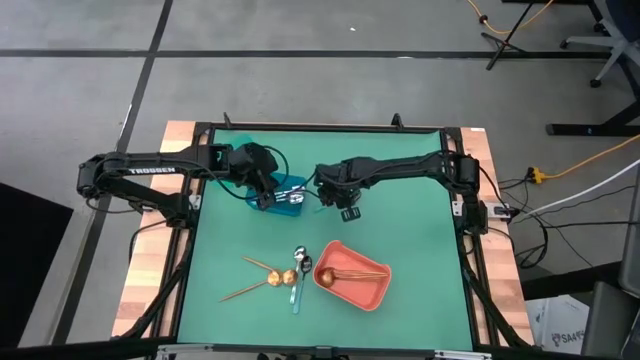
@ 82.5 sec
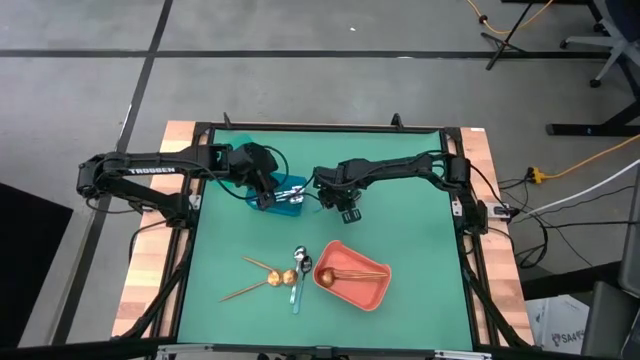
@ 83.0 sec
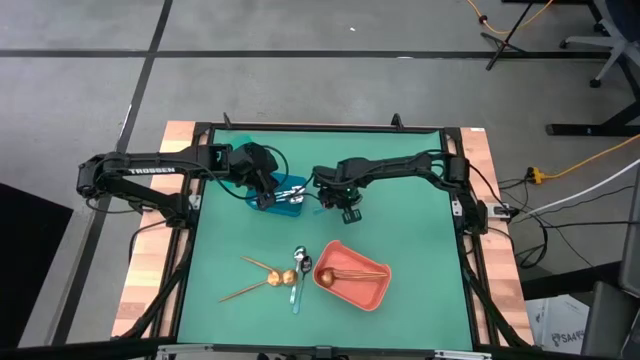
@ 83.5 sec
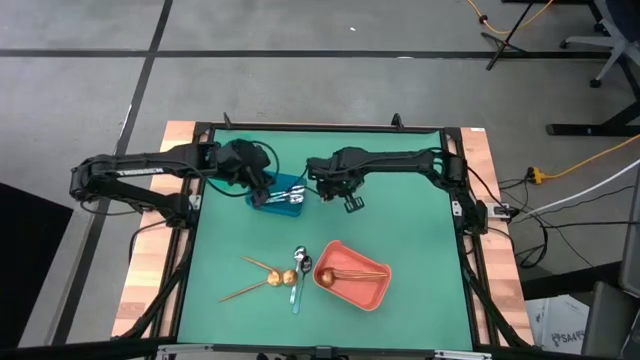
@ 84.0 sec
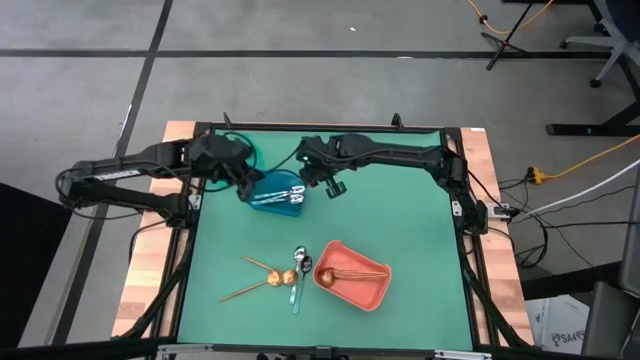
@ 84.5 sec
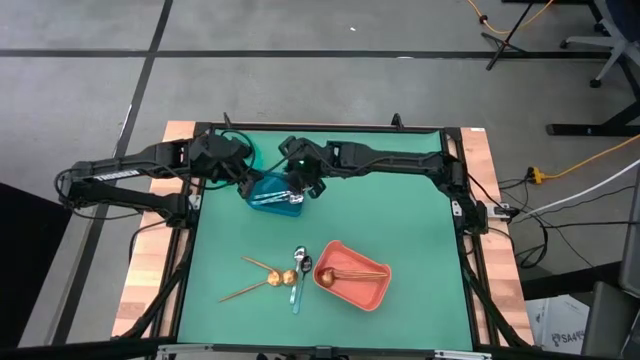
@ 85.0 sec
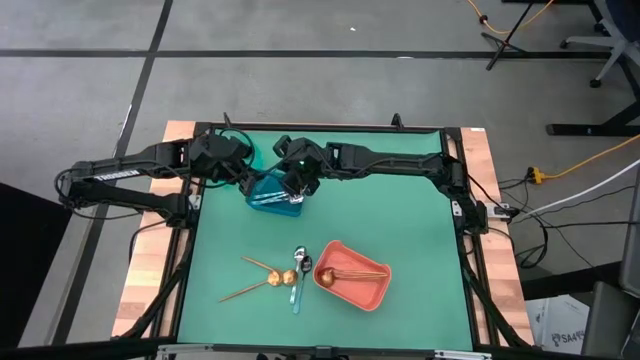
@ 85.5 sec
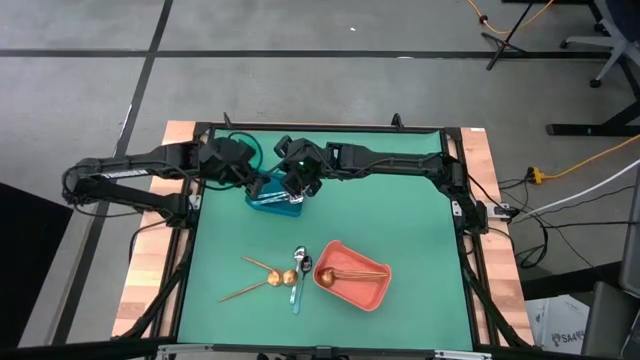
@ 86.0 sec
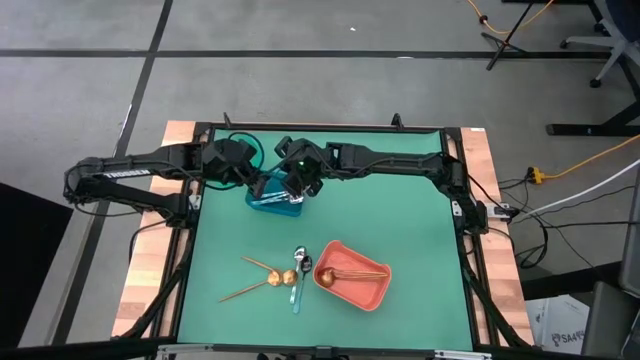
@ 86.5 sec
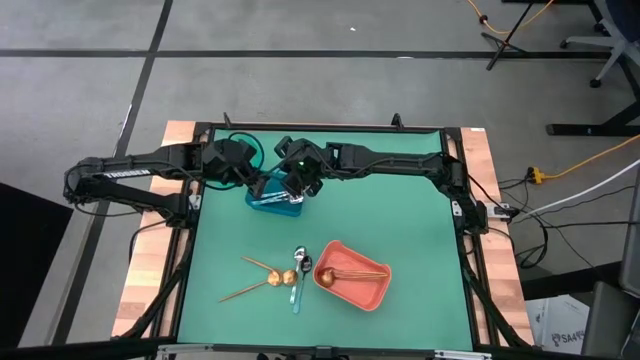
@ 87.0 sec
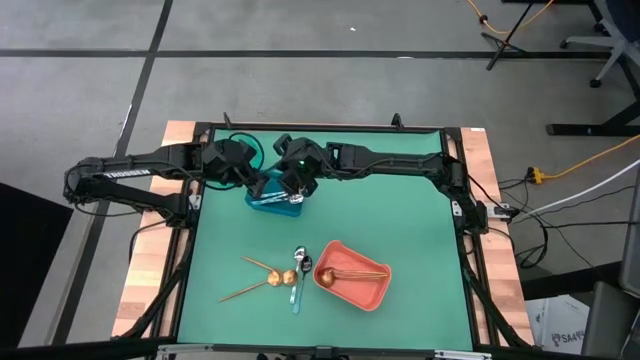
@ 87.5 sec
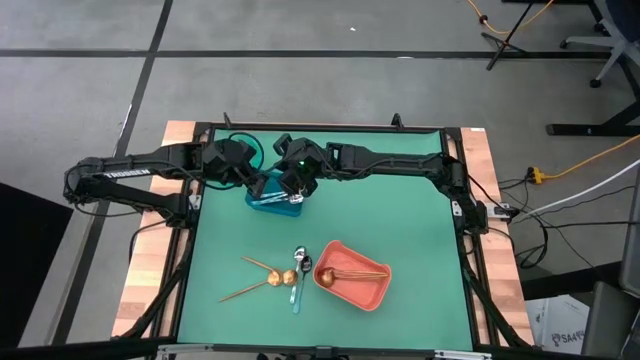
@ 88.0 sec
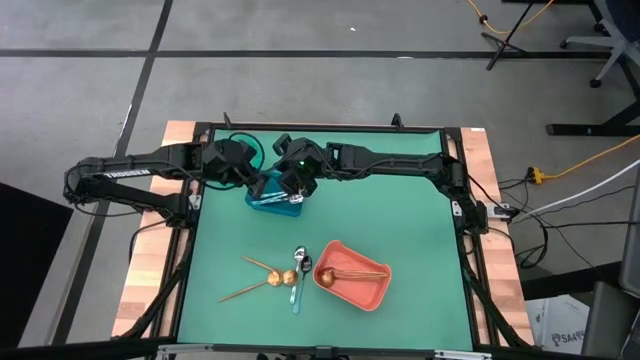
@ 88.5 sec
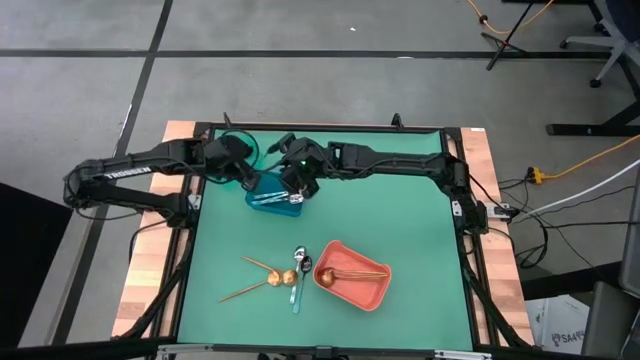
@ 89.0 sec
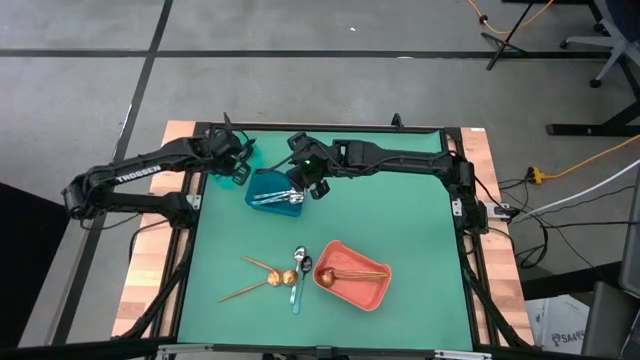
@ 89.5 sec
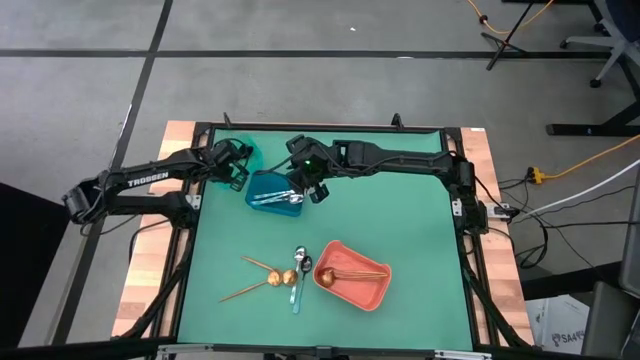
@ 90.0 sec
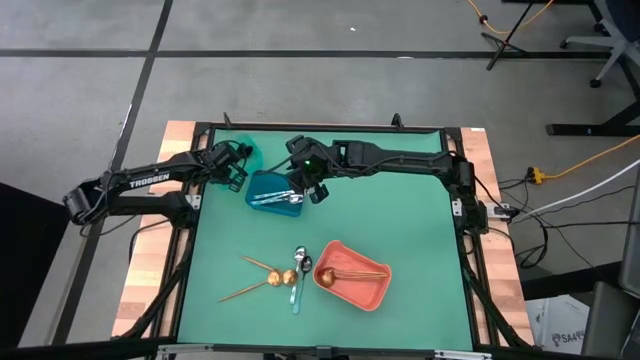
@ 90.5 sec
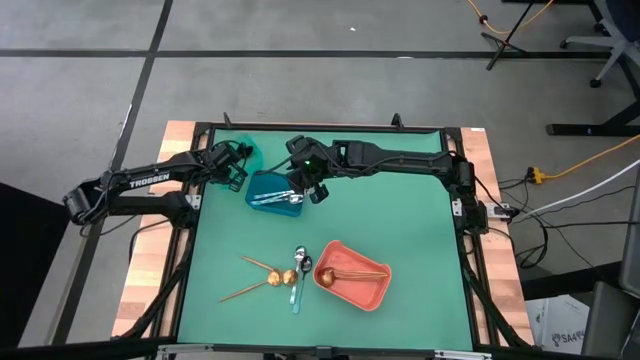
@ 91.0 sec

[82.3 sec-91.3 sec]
Task: Sort silverware by color (type)
Put the blue spoon into the transparent green bin

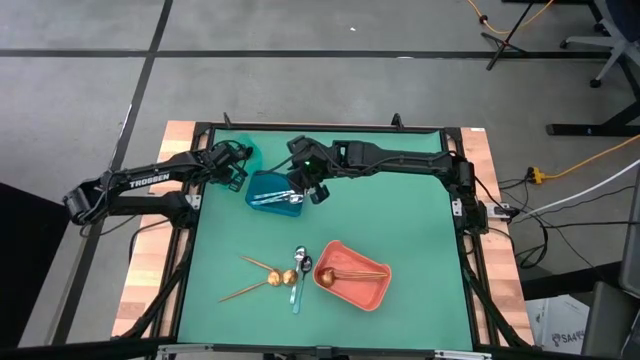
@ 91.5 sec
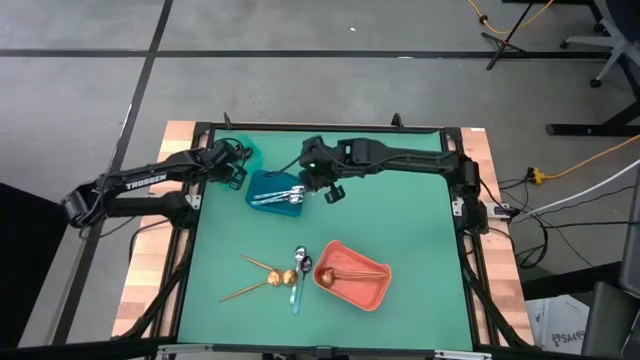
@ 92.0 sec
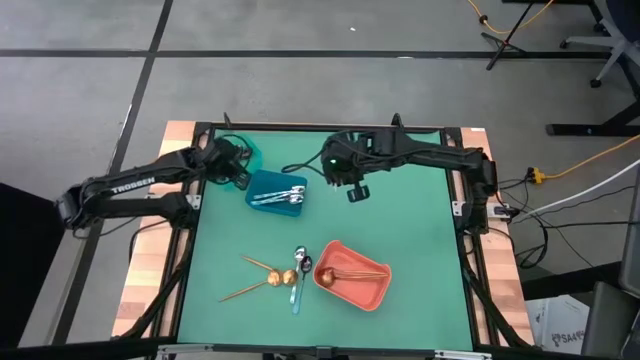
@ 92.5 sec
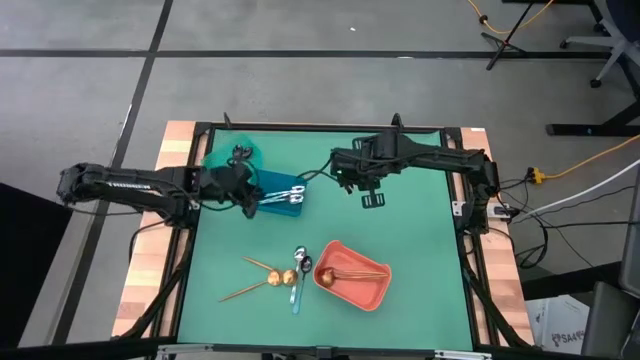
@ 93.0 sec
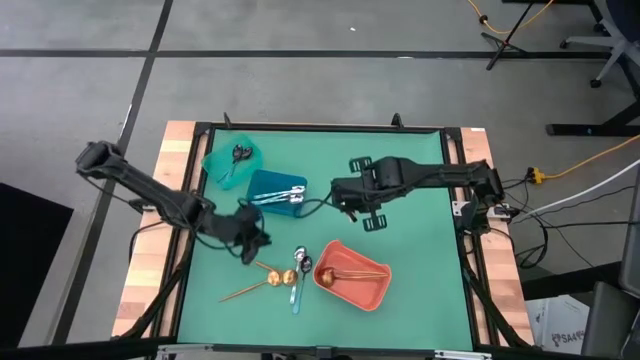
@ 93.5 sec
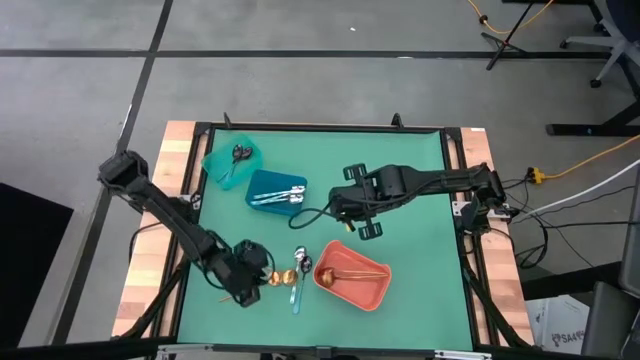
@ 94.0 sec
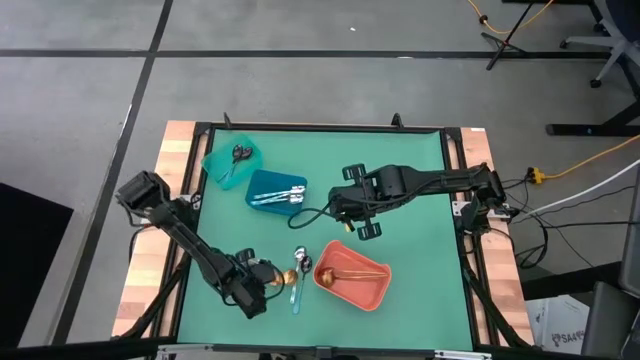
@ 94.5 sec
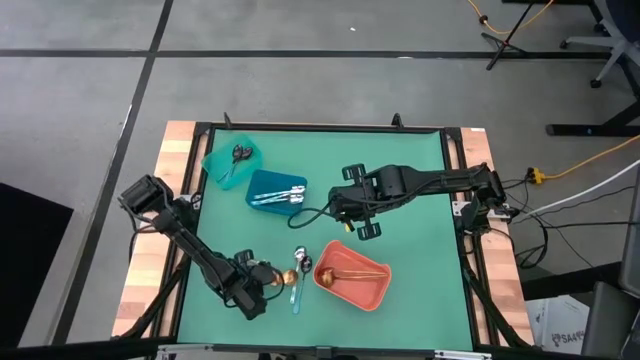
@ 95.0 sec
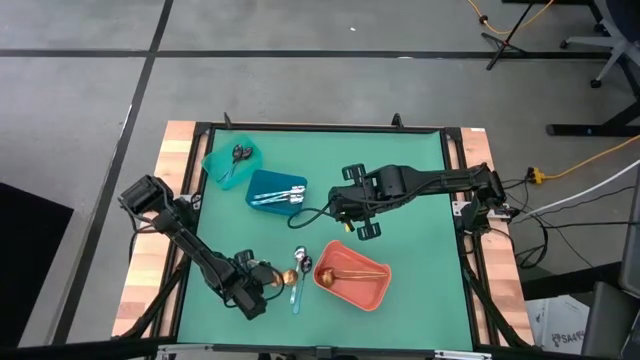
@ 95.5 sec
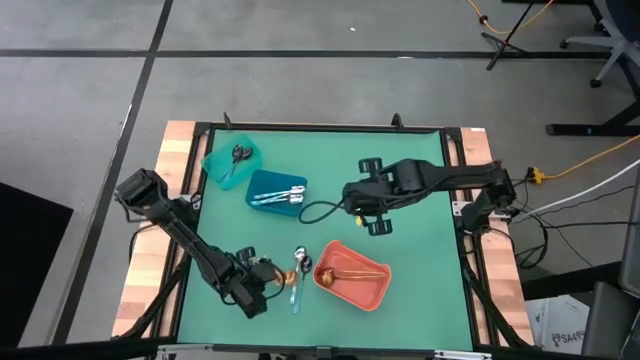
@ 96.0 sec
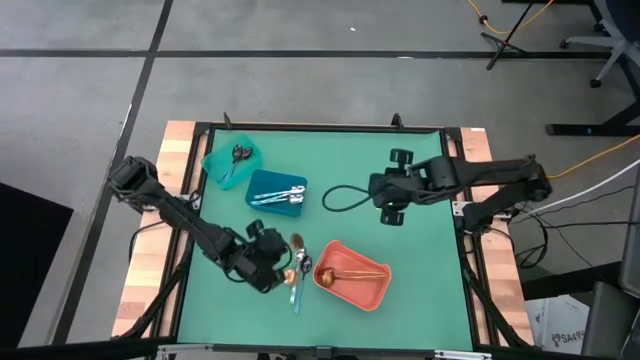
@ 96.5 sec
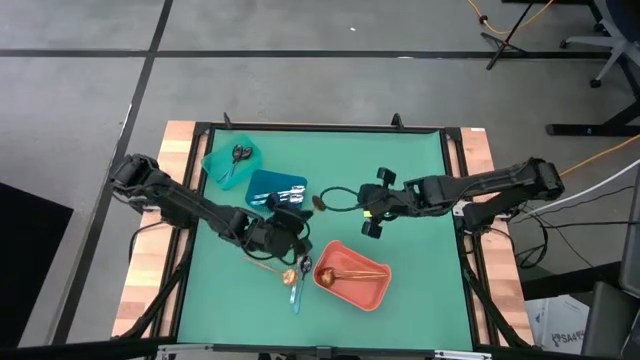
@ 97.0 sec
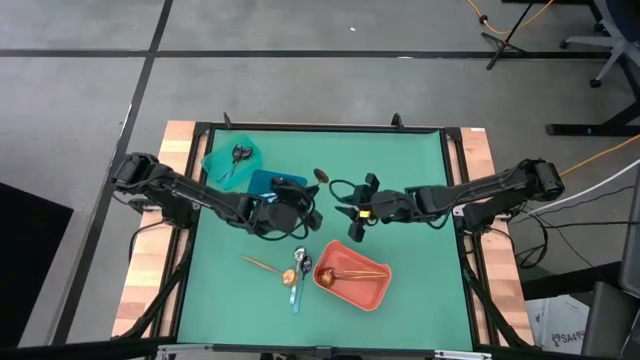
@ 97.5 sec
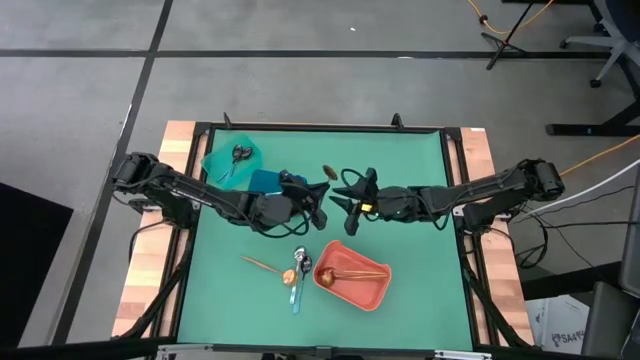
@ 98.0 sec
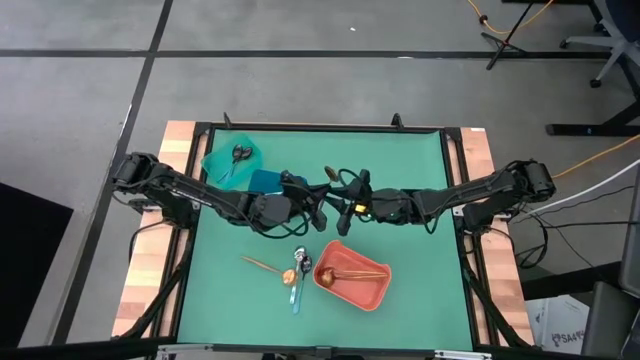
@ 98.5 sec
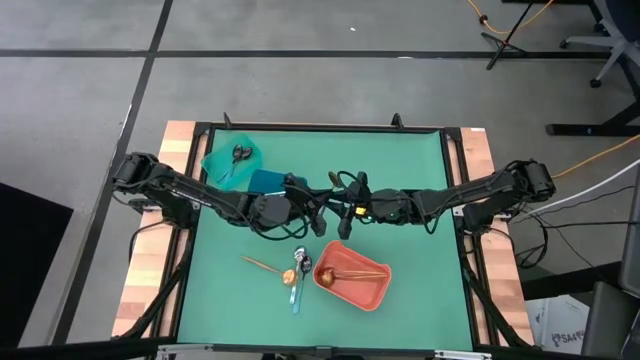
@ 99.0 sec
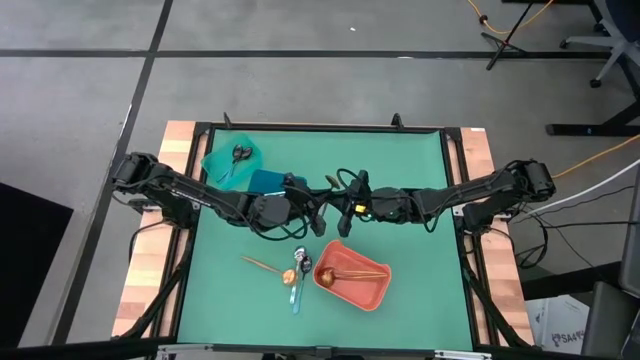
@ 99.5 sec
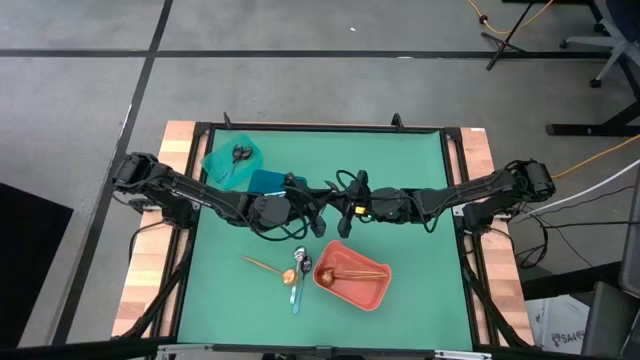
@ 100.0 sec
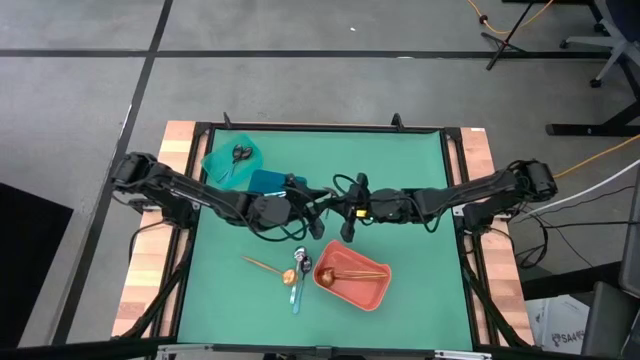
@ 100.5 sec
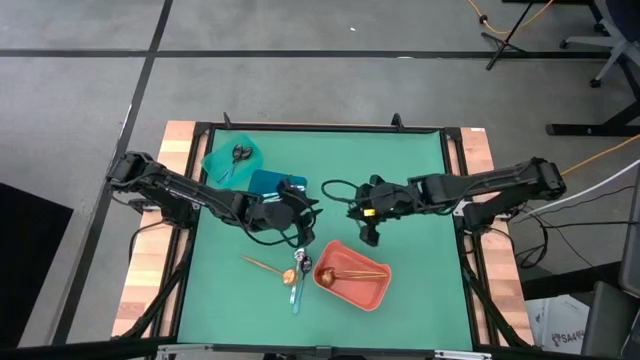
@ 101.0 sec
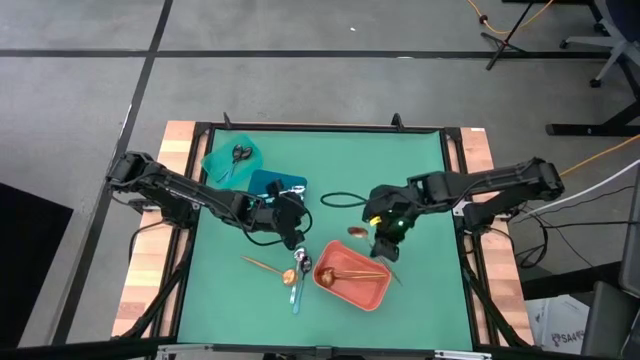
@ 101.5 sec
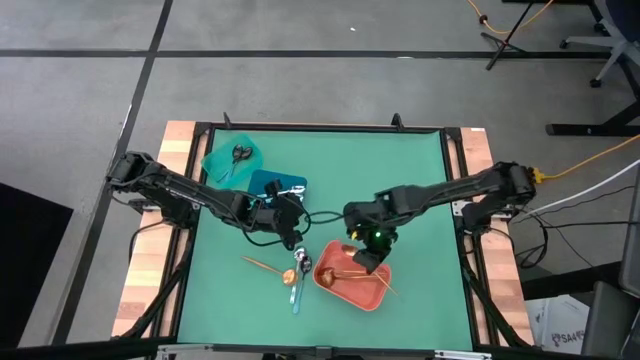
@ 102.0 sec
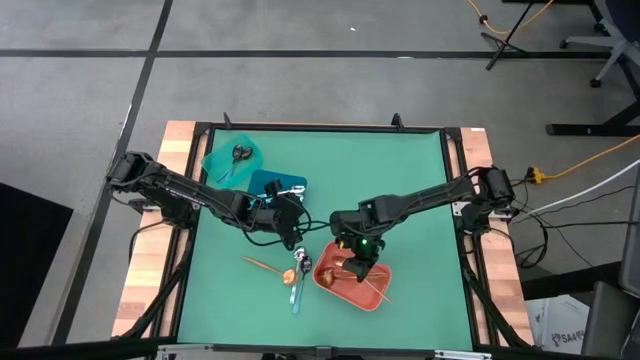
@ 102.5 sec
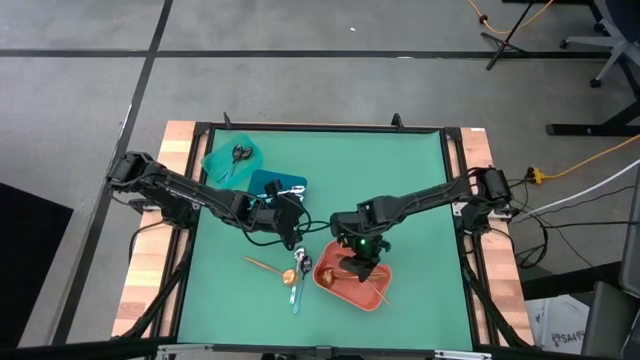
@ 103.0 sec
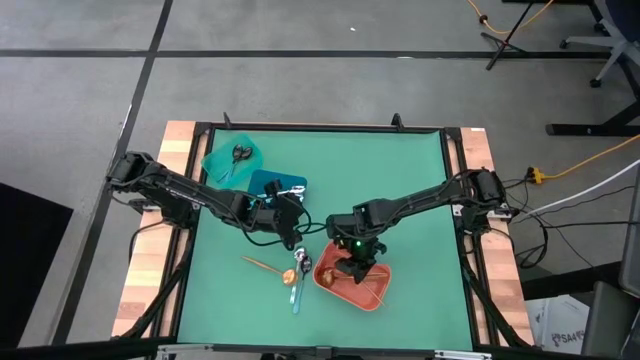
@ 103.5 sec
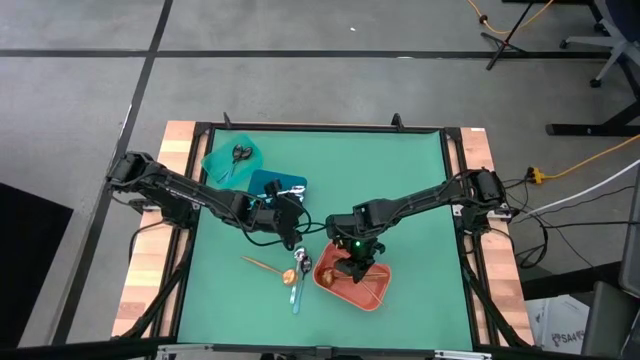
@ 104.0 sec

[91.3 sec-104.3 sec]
Put the yellow spoon into the orange bin
